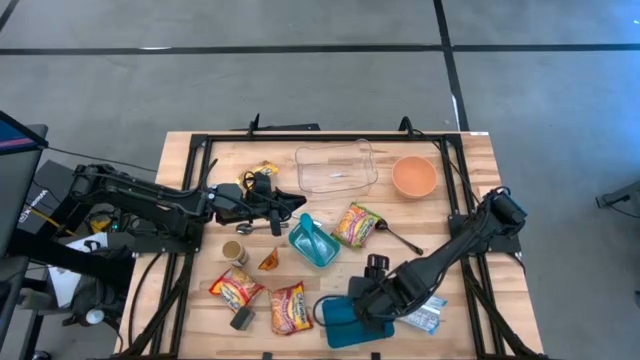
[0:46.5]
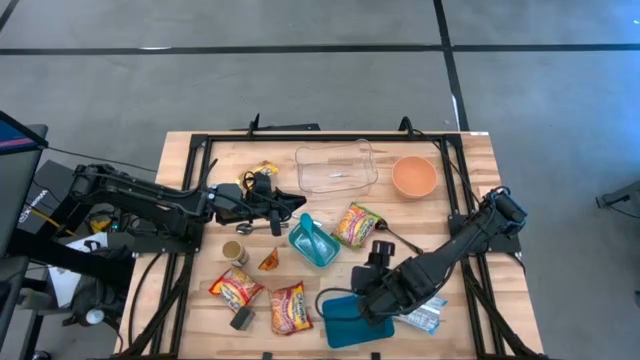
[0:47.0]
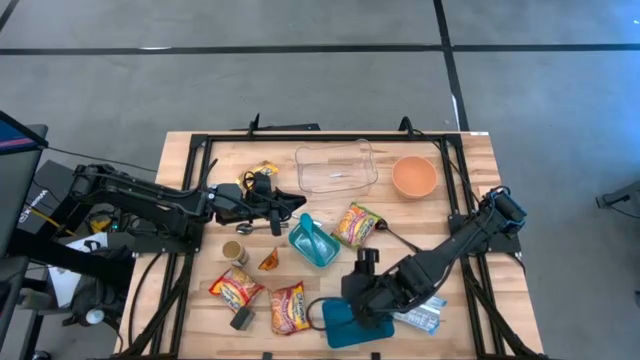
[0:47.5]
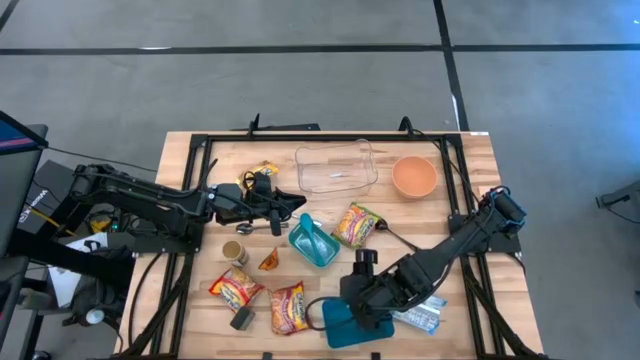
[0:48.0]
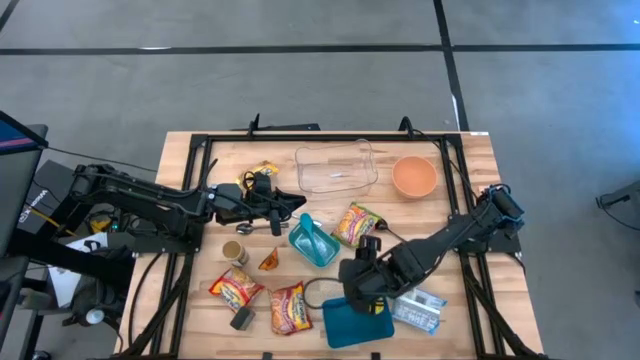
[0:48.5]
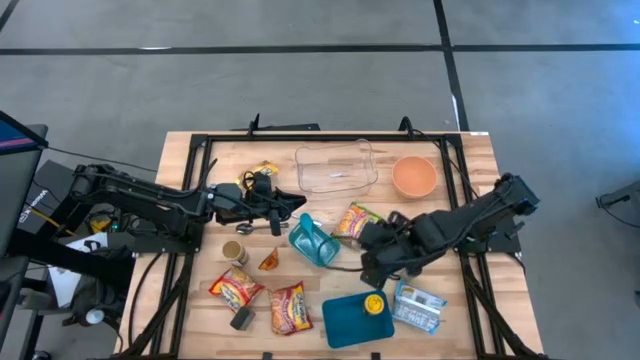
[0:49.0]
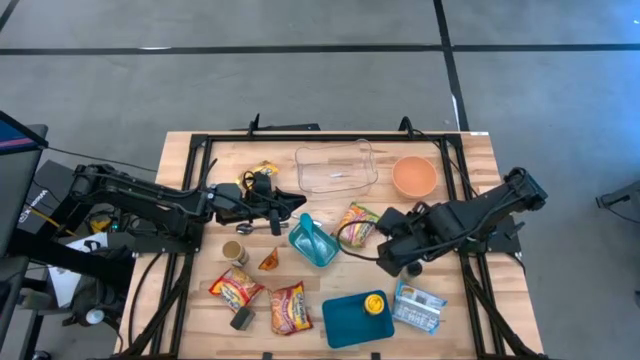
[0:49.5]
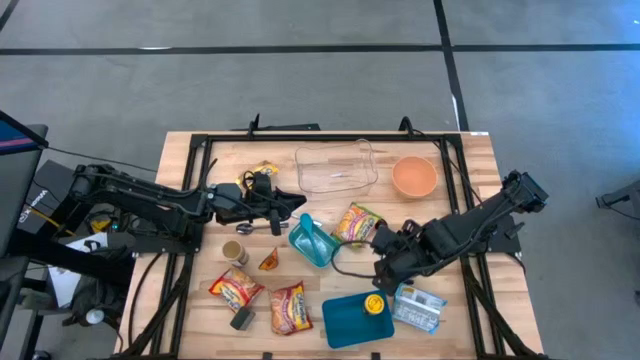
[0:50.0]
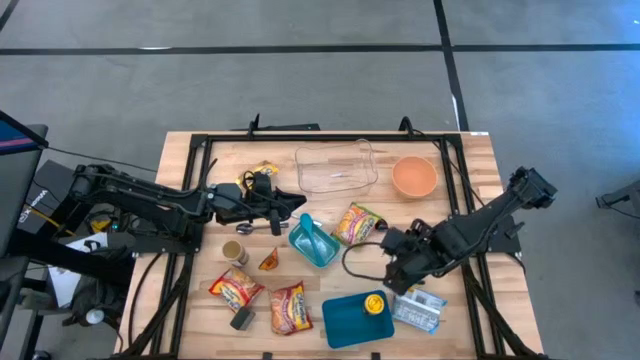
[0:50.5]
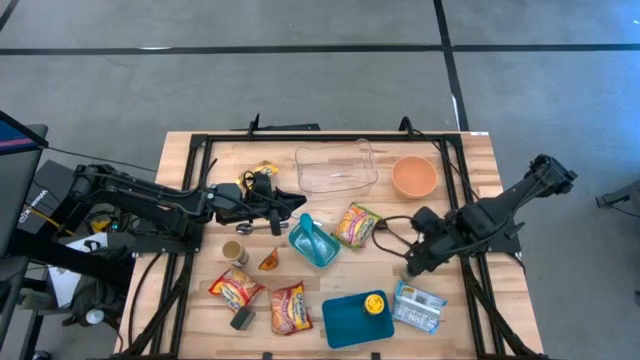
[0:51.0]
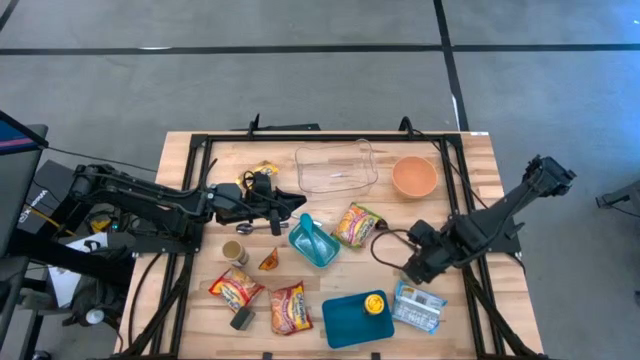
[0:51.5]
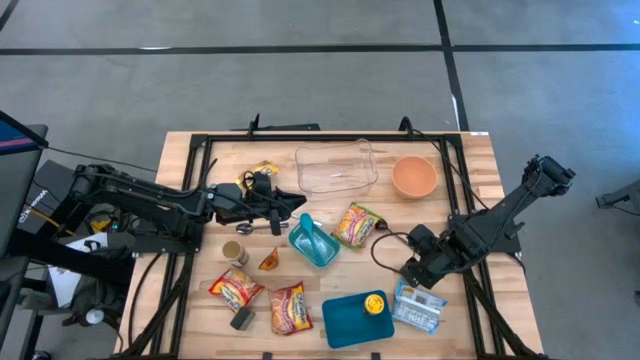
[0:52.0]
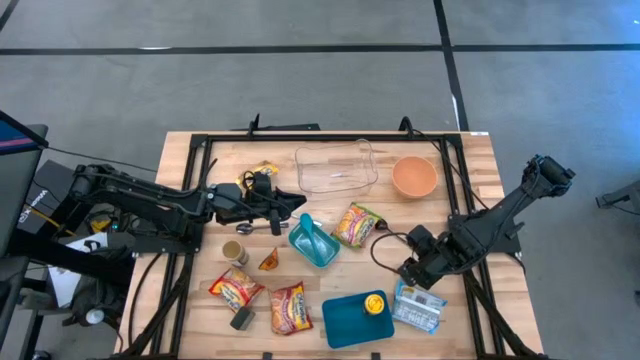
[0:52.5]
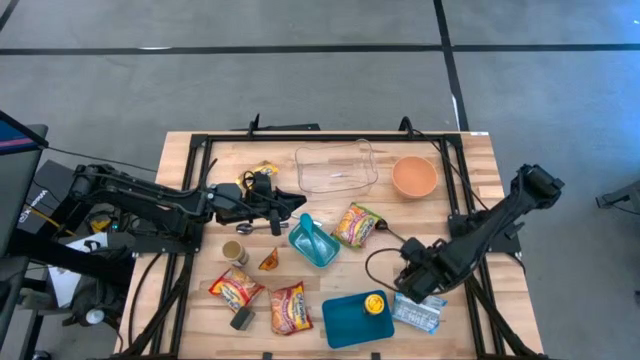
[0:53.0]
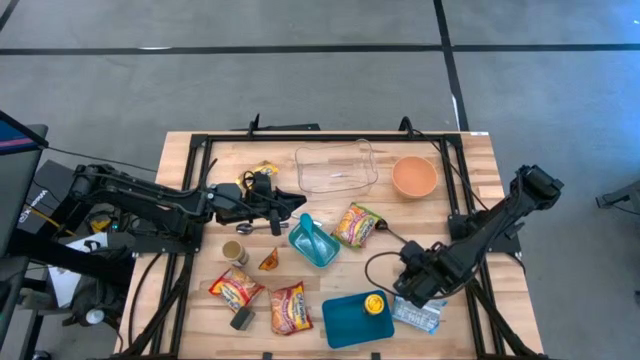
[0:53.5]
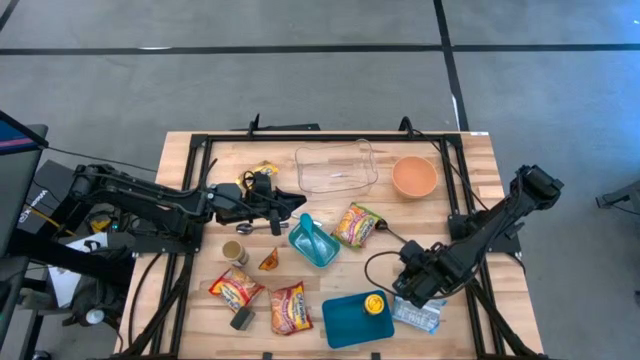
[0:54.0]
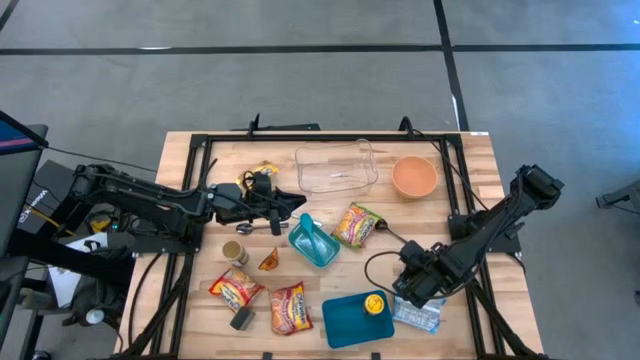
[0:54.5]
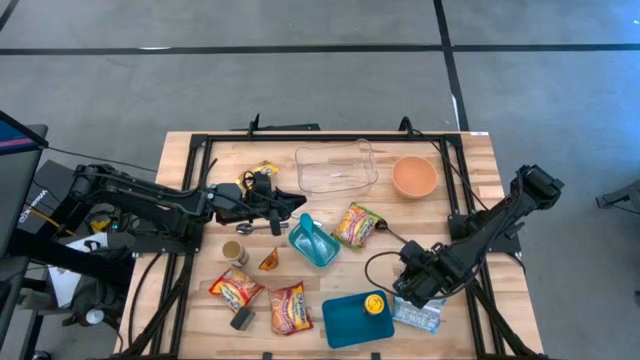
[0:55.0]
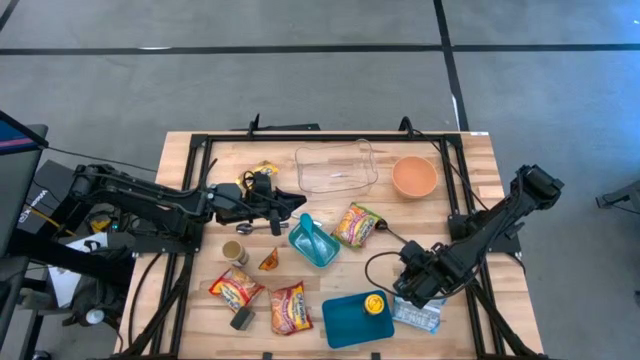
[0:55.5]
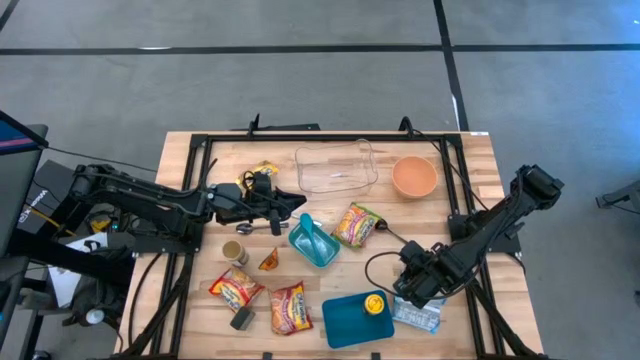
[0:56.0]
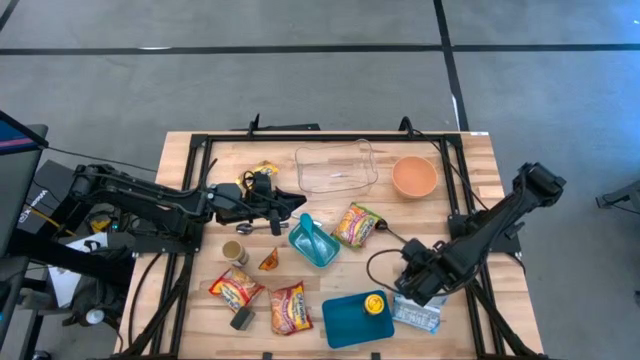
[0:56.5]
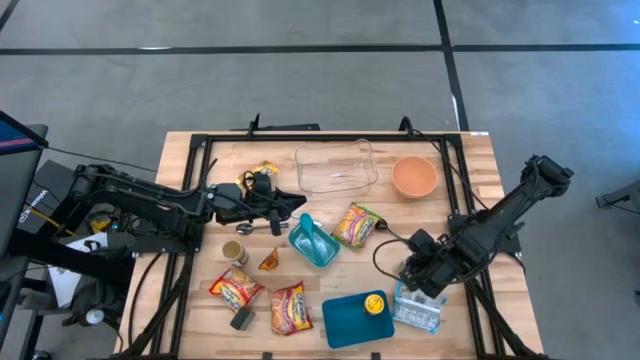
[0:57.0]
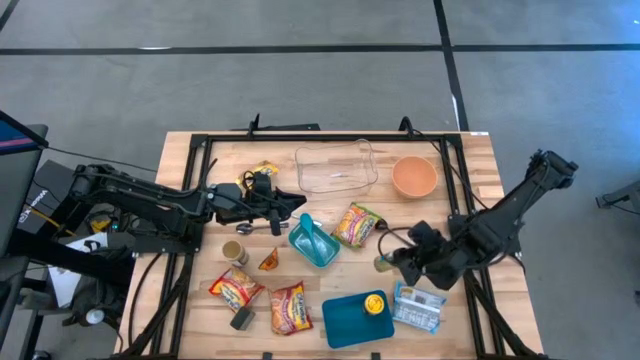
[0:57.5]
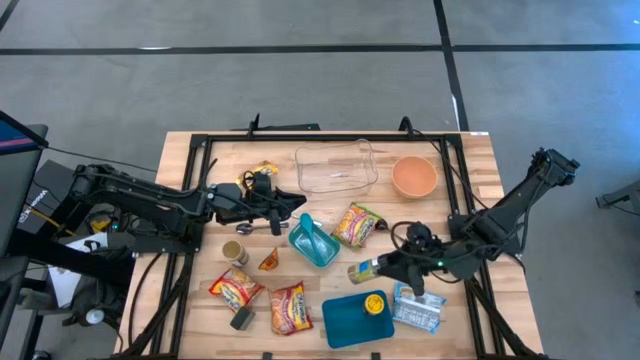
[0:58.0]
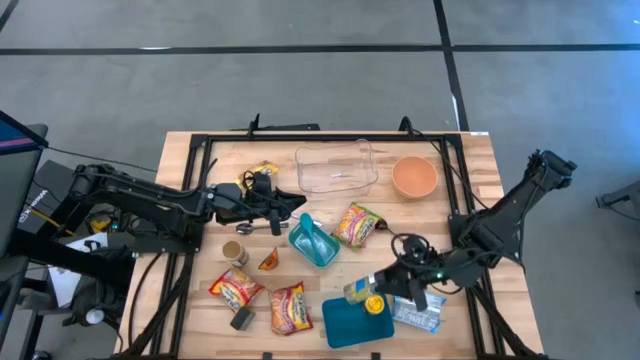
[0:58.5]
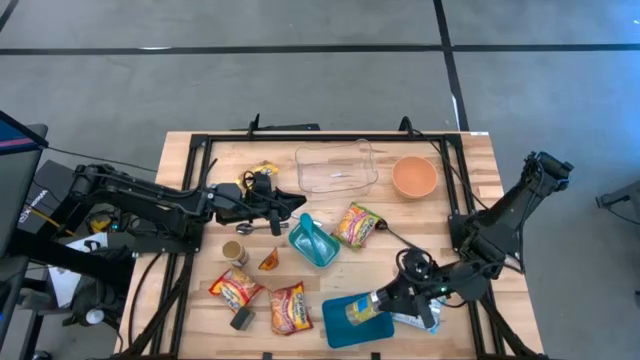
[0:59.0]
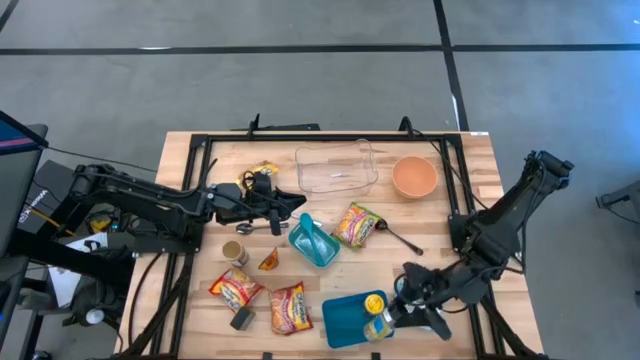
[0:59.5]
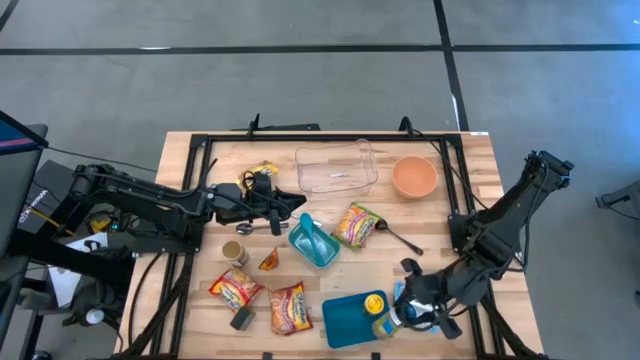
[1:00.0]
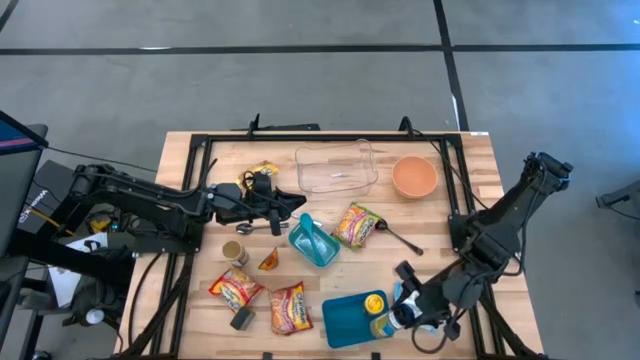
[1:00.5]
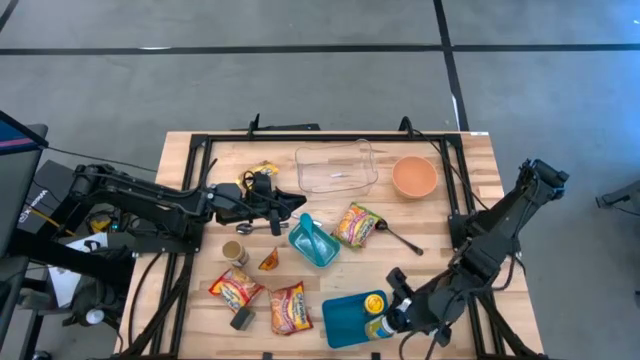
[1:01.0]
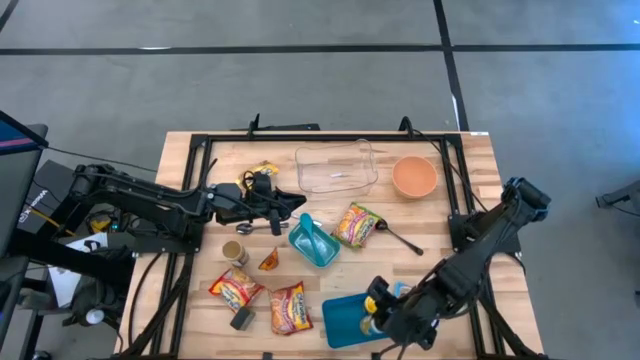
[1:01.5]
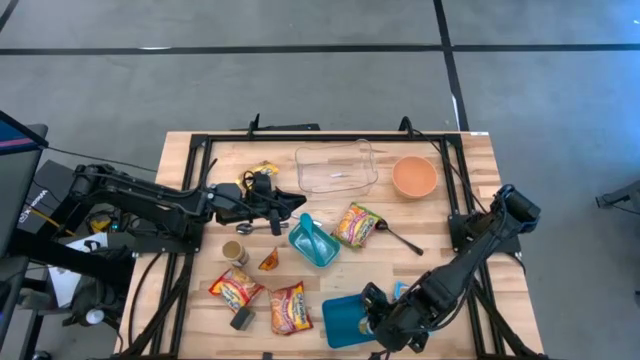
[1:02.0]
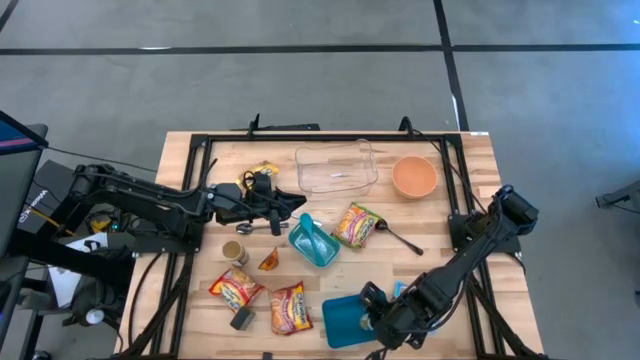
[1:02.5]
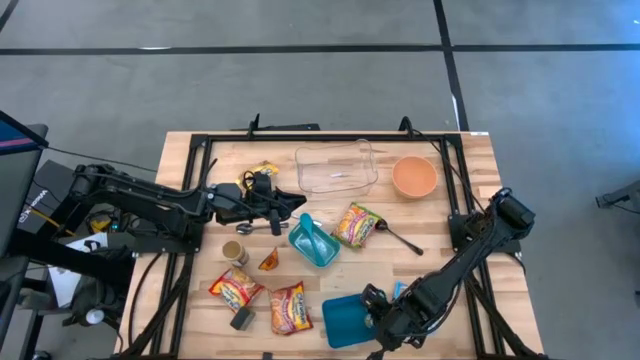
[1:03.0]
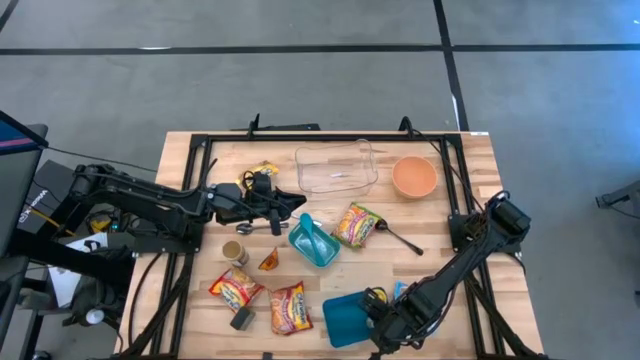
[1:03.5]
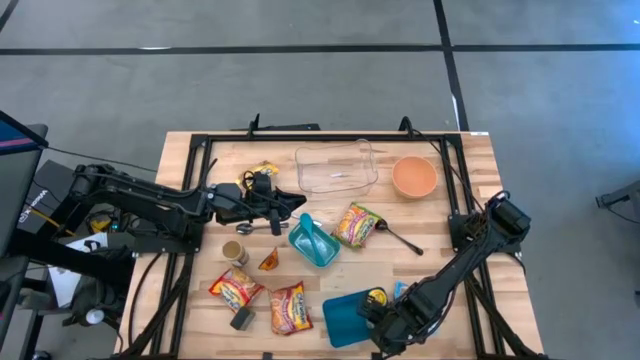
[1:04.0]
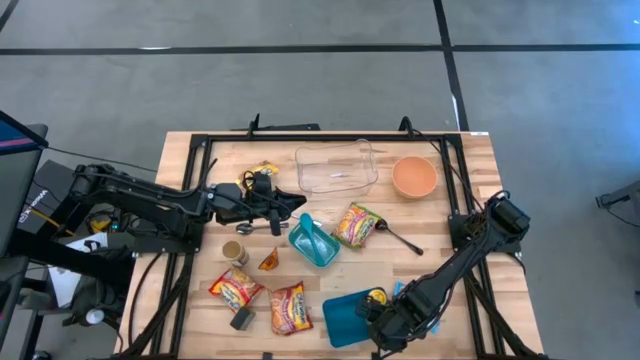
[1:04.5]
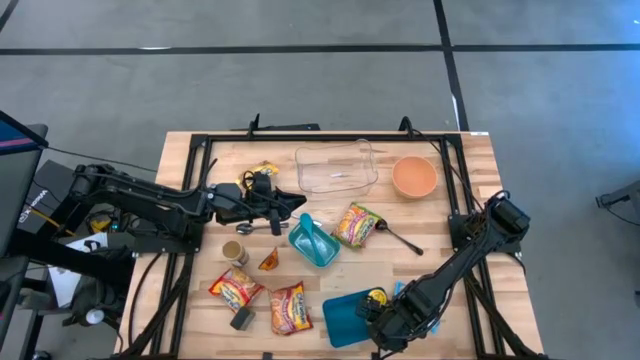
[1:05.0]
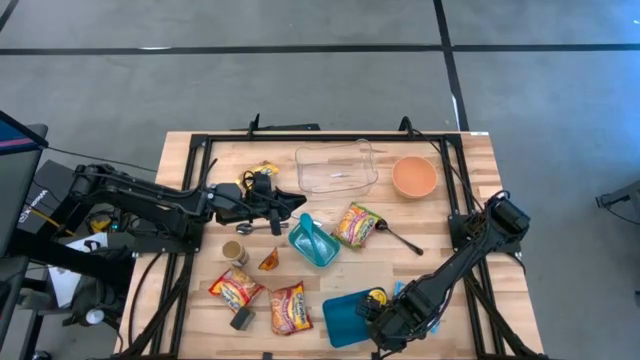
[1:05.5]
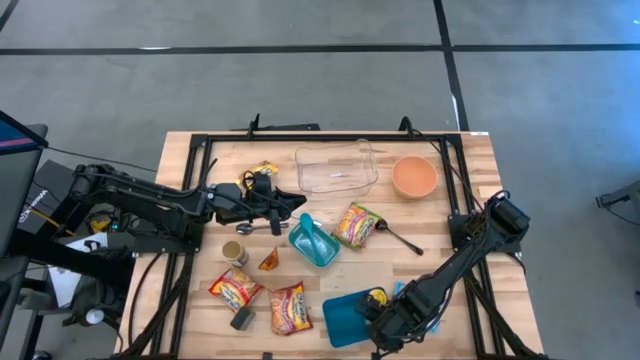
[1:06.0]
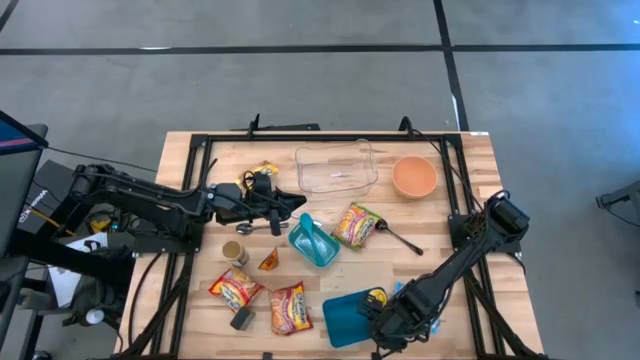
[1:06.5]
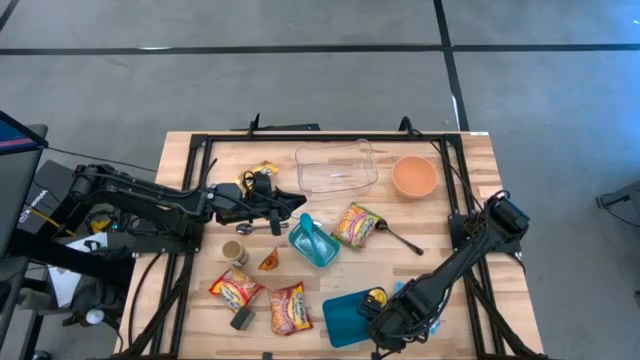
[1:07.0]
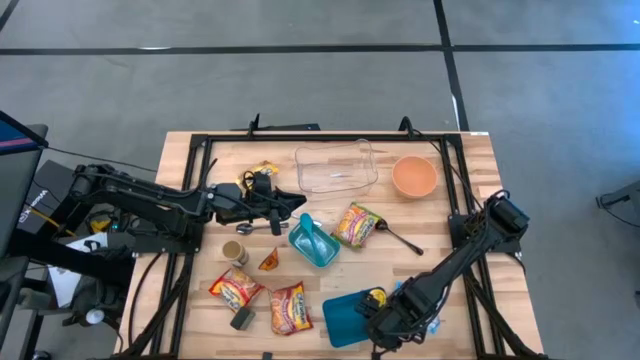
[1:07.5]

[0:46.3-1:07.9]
Task: Pick & Place Food Item
Put the black seasoning bottle into the blue bin
